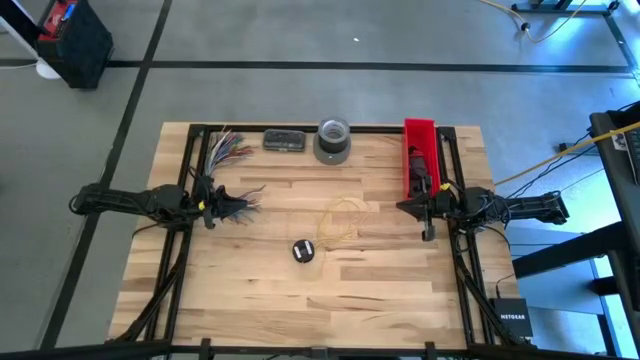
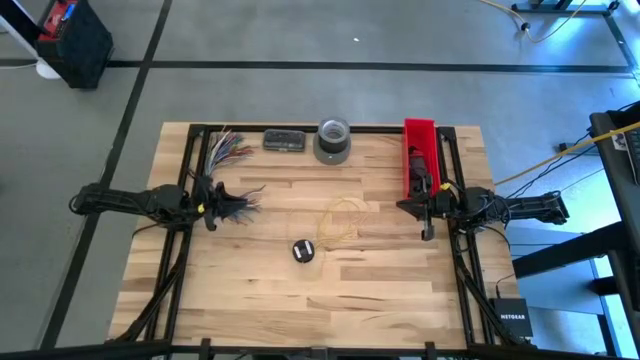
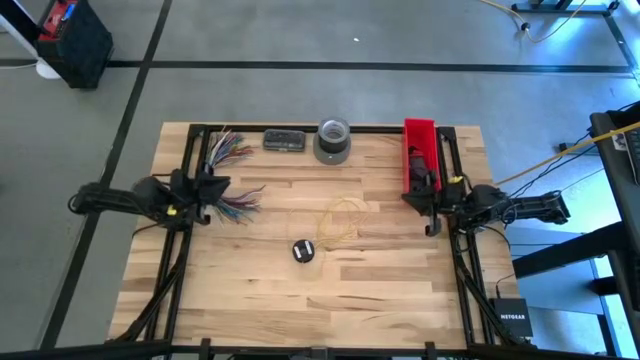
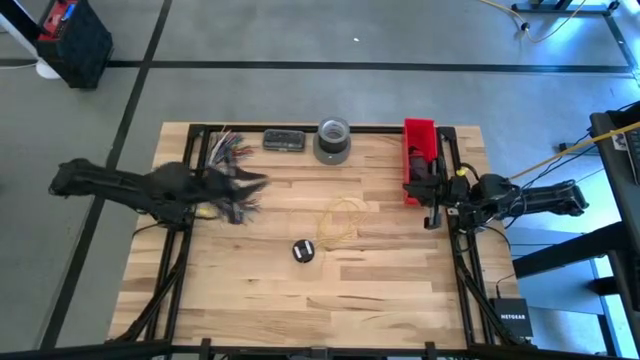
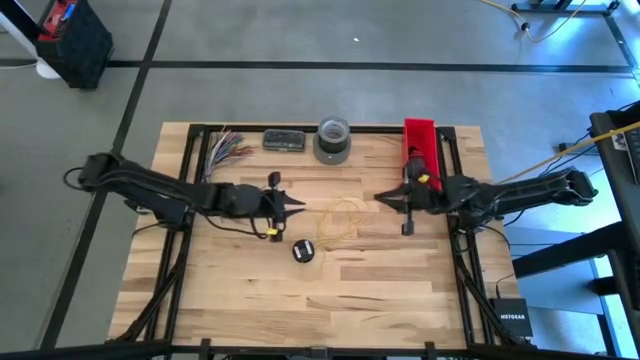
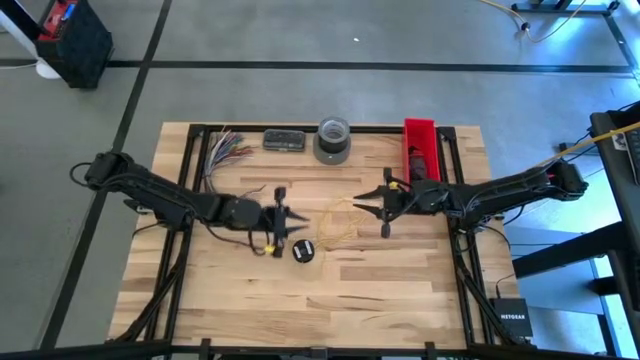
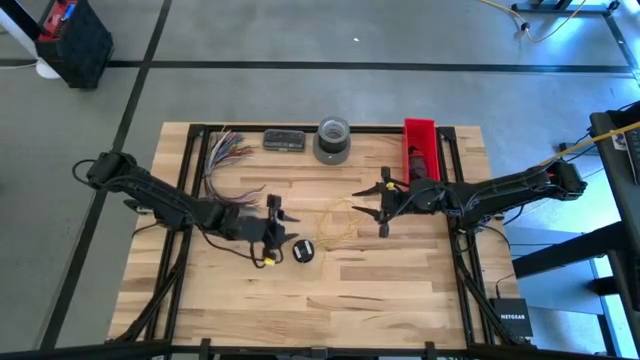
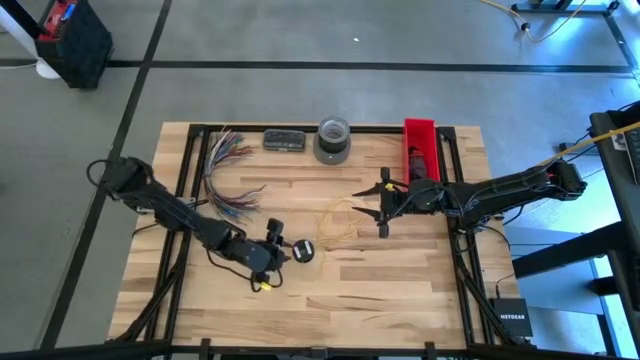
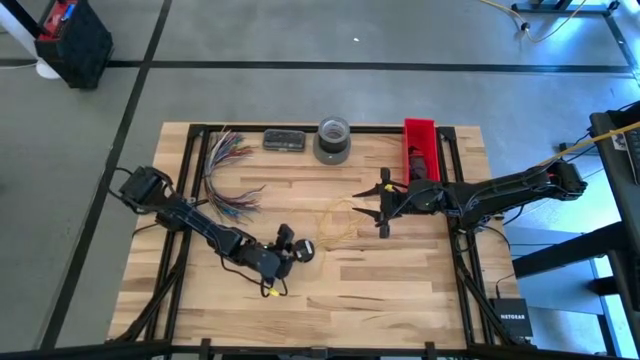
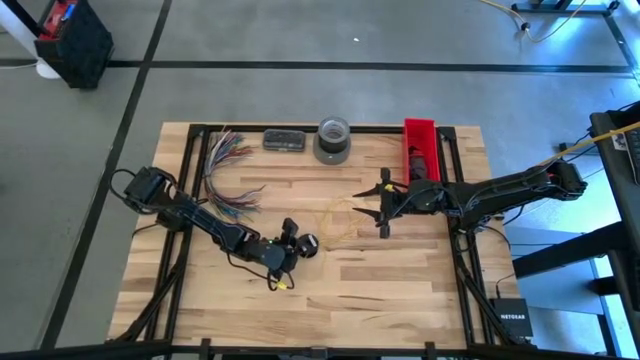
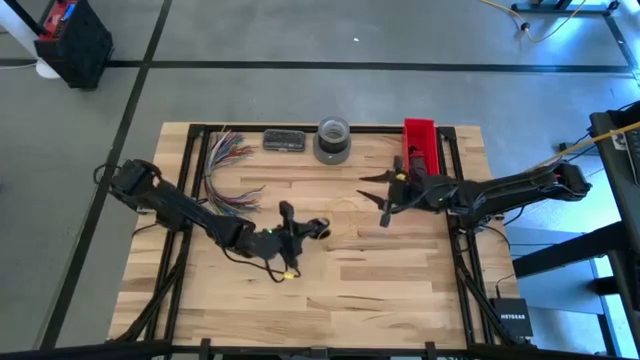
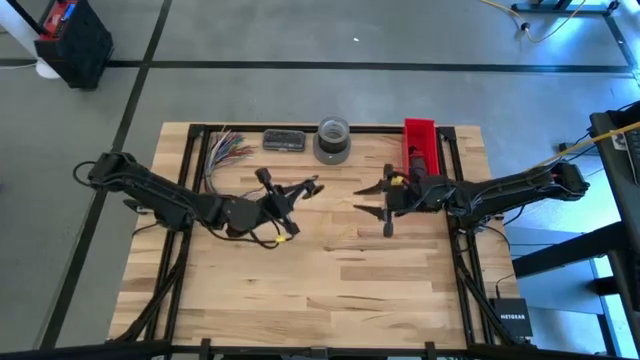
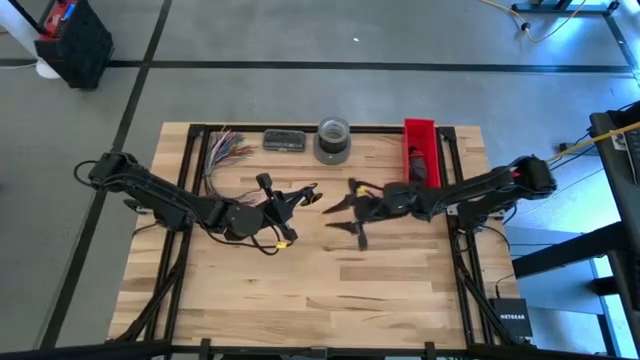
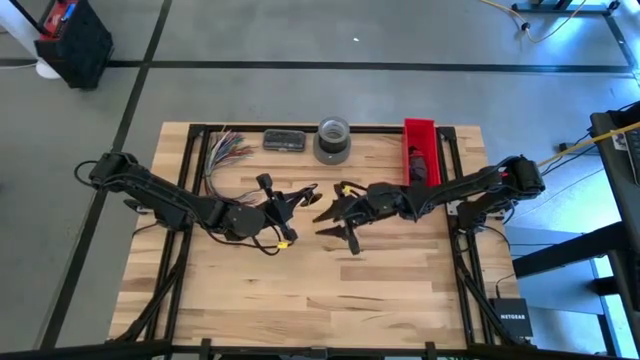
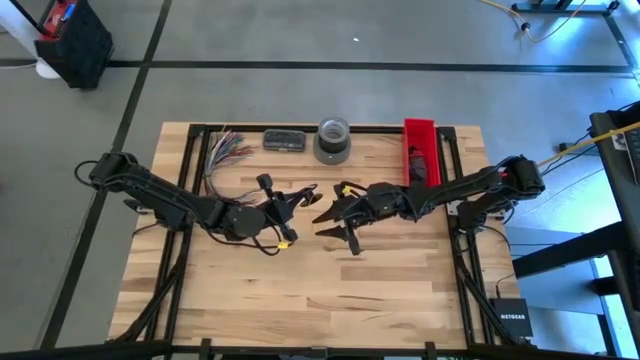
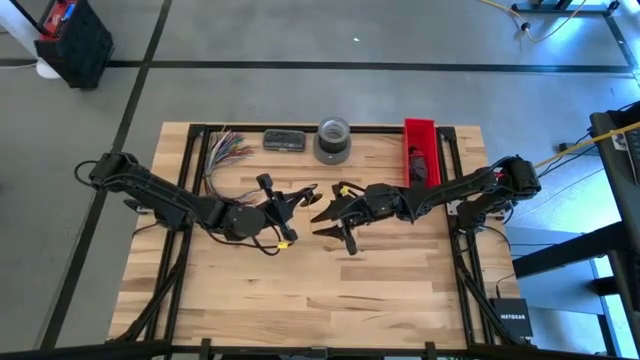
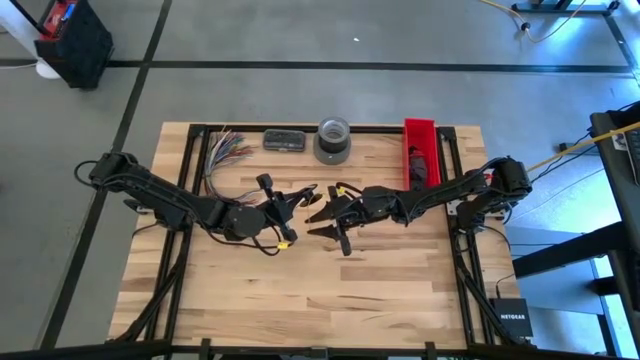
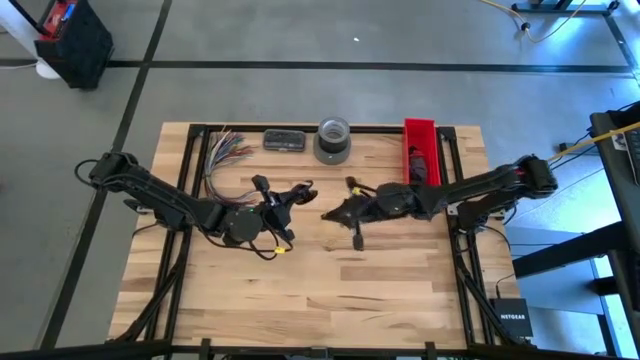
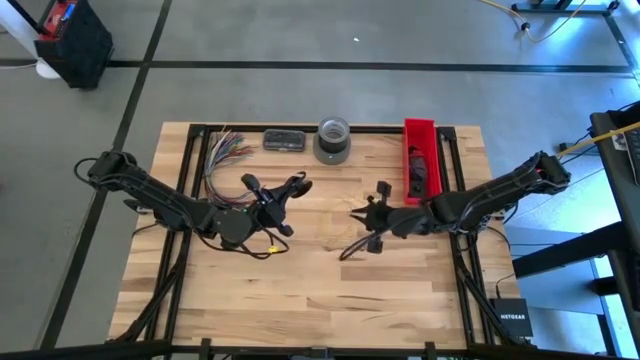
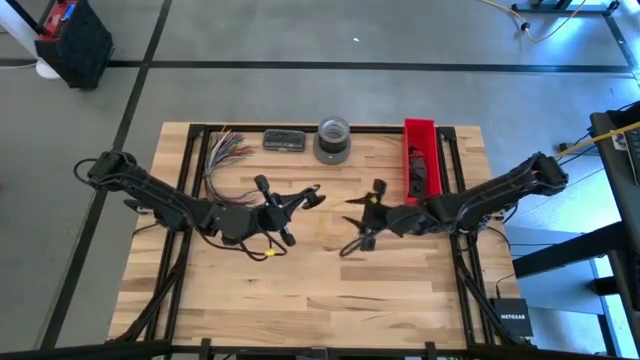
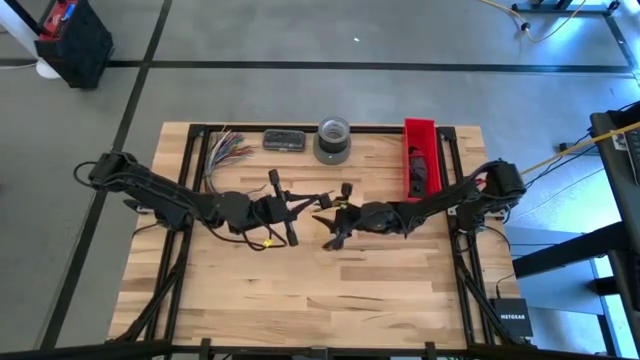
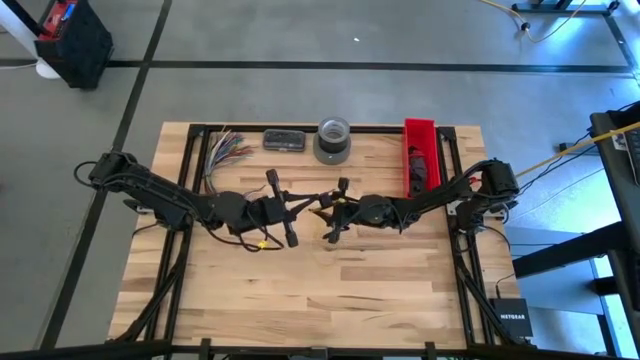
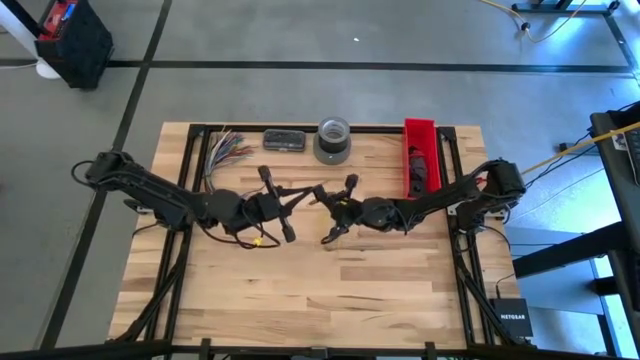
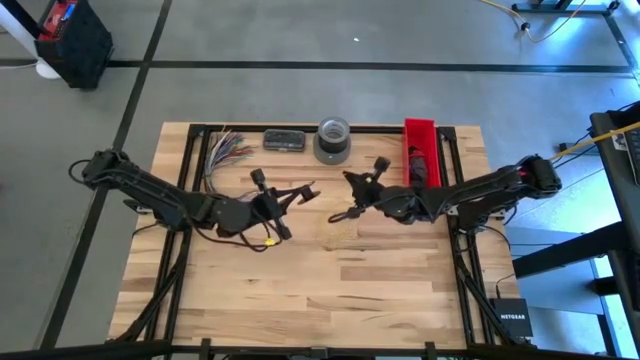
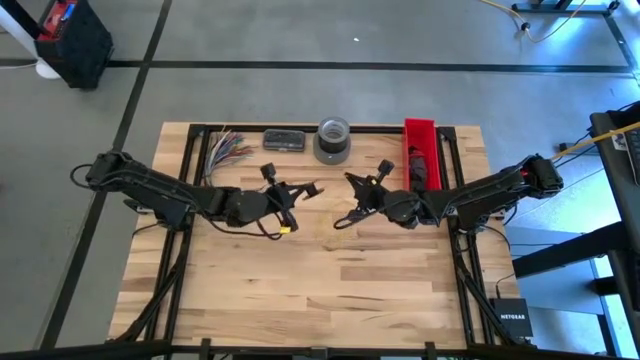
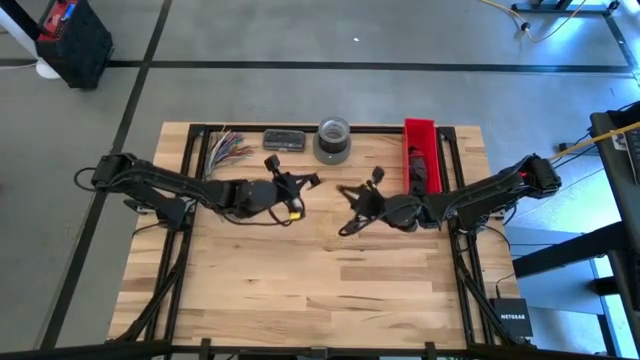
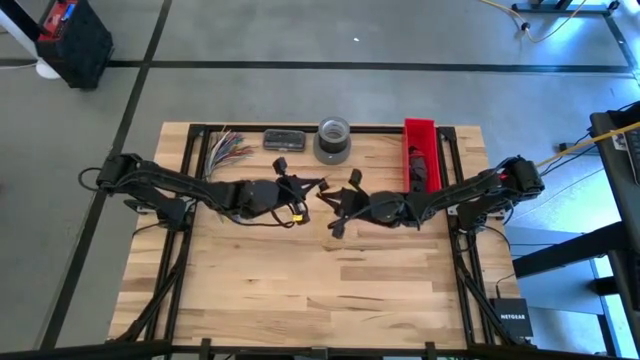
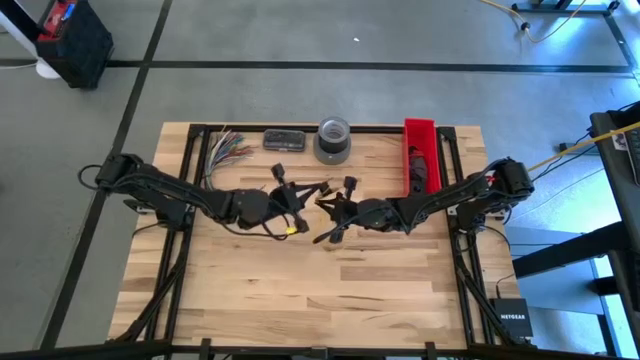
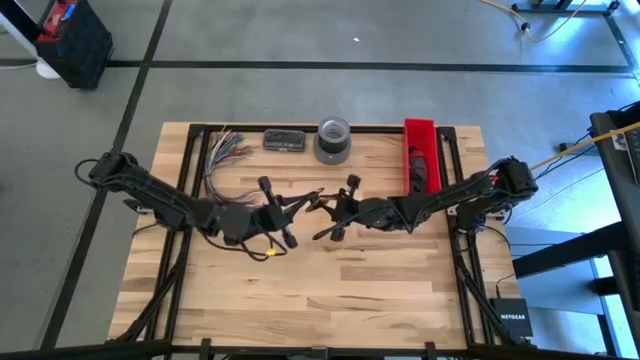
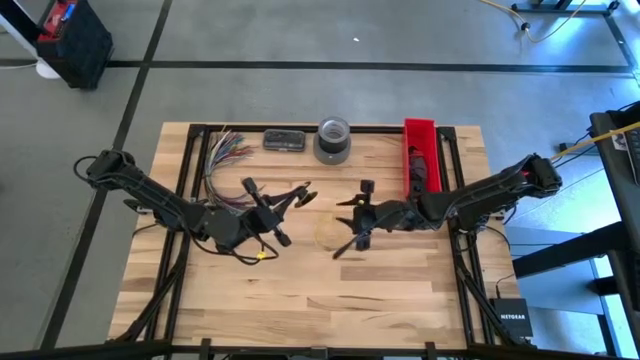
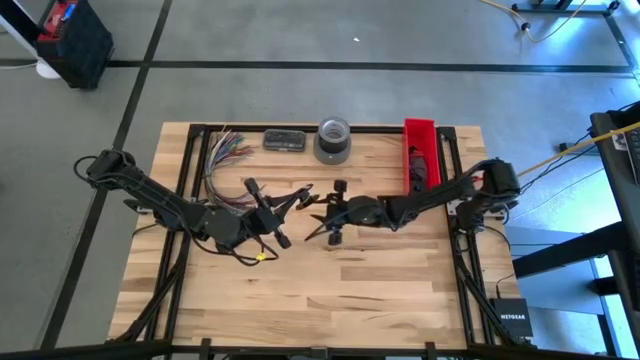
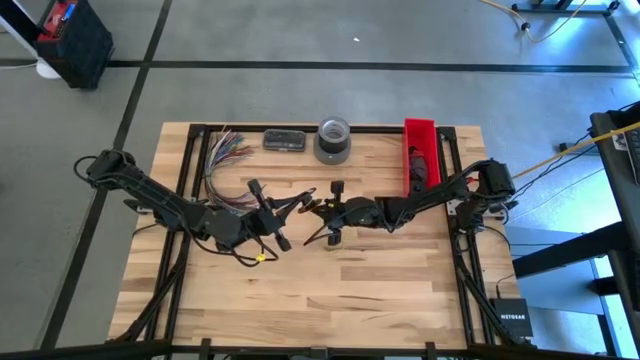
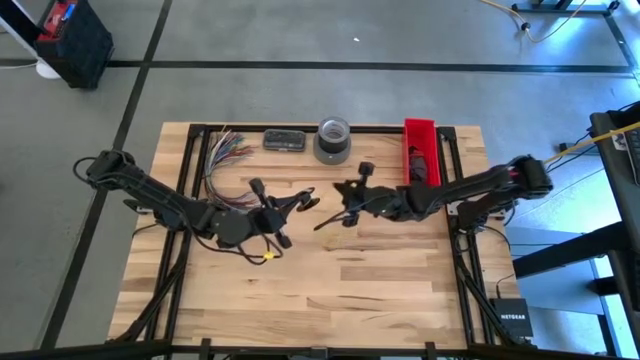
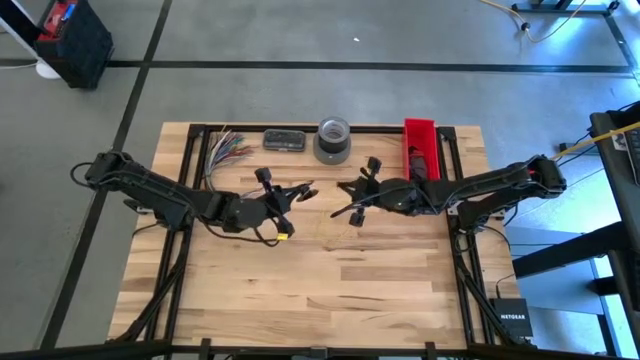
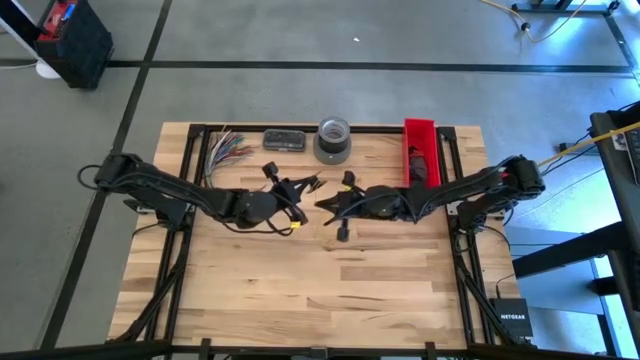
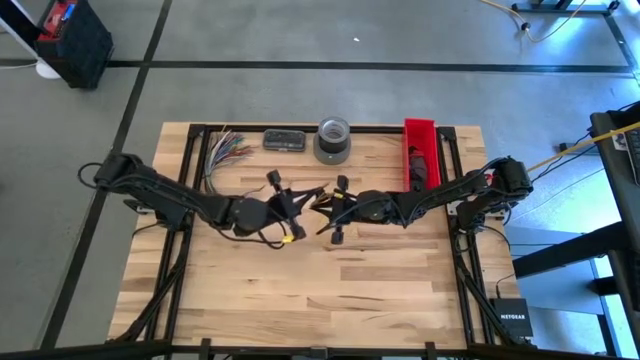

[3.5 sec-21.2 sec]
Task: Coil cords
Coil the yellow wire into the black spool

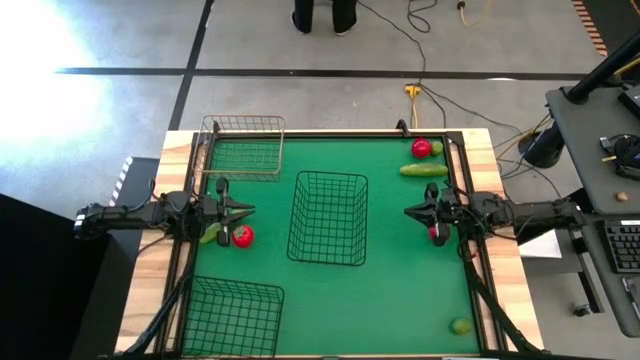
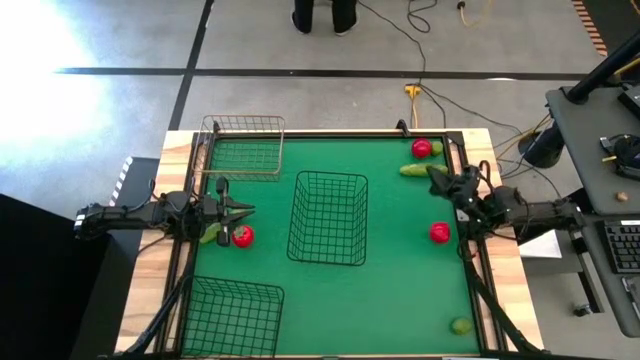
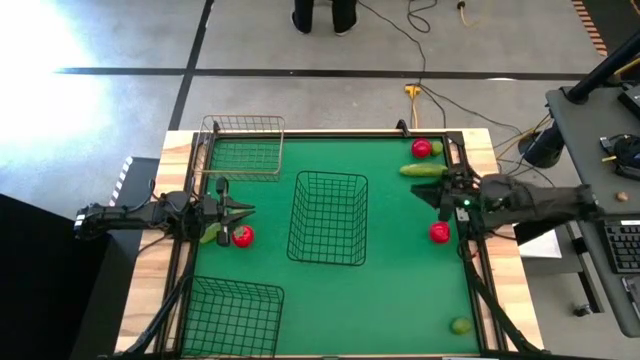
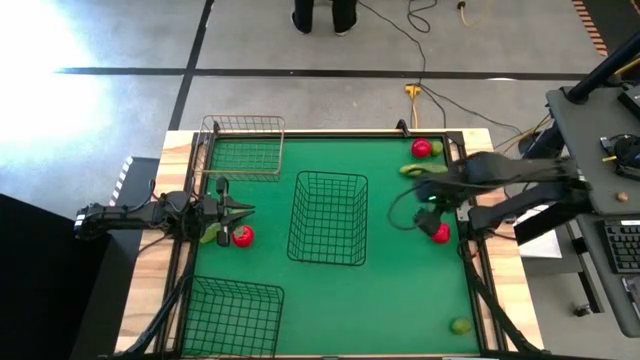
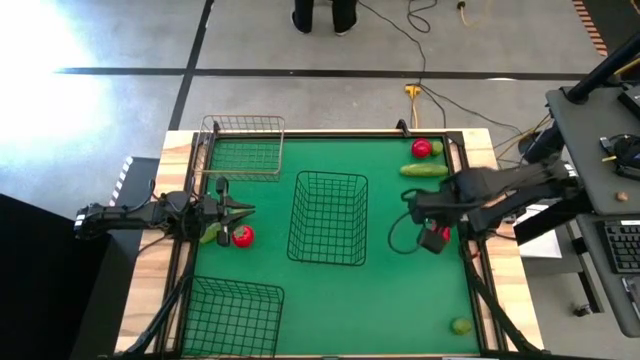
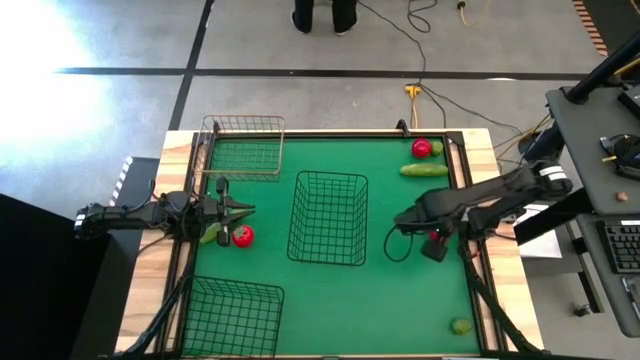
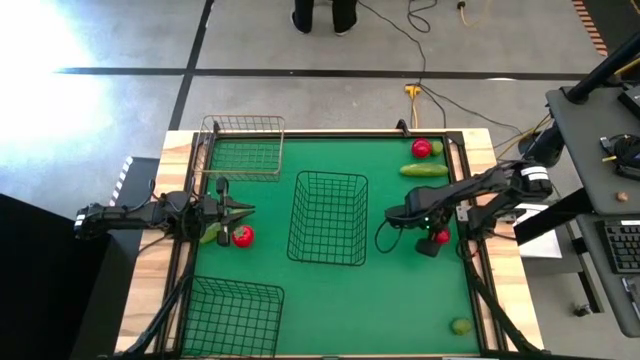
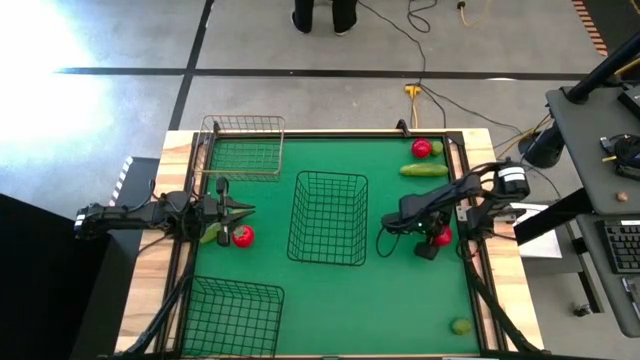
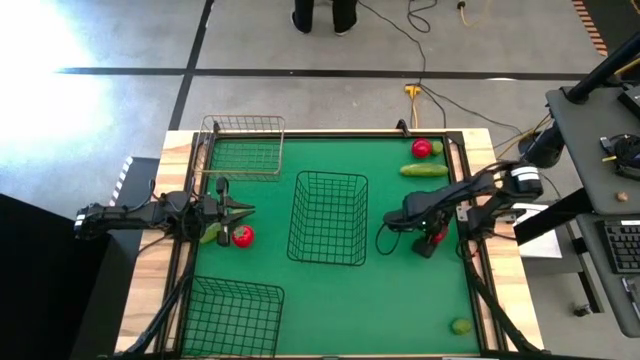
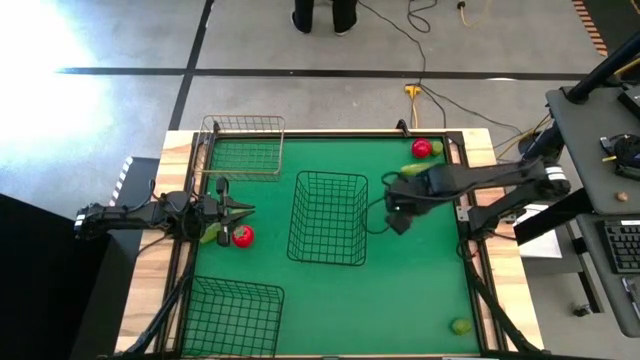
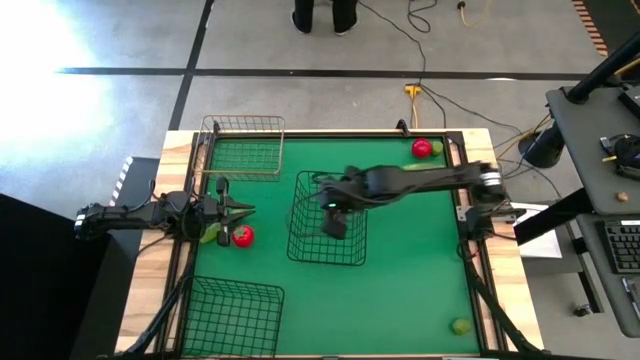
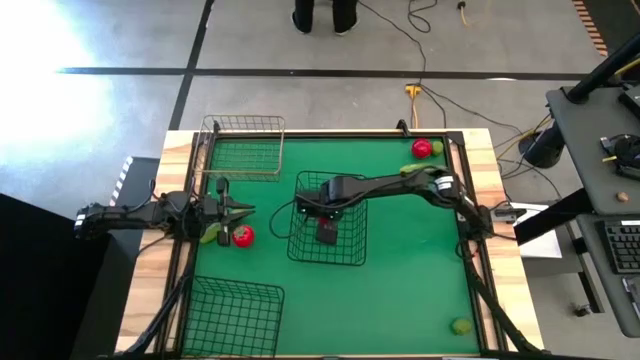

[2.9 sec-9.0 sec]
Task: Sort produce into baskets
Put the bottom right tomato into the top black wire basket
